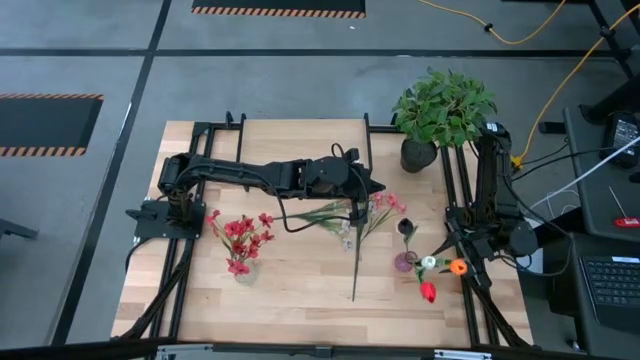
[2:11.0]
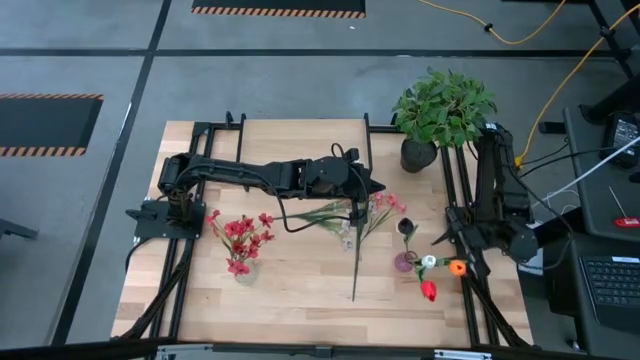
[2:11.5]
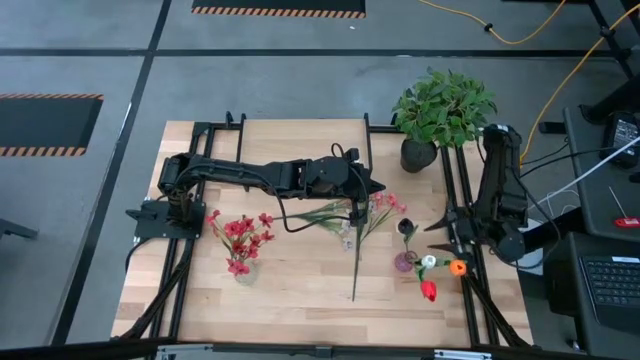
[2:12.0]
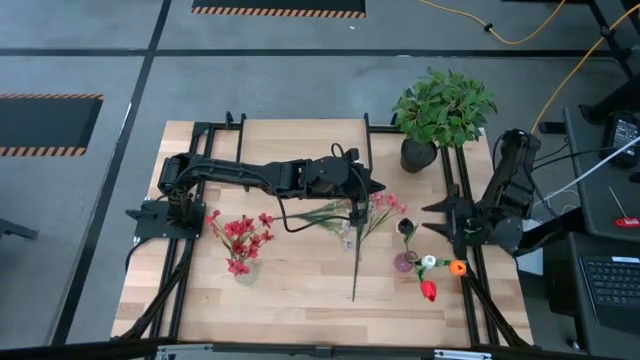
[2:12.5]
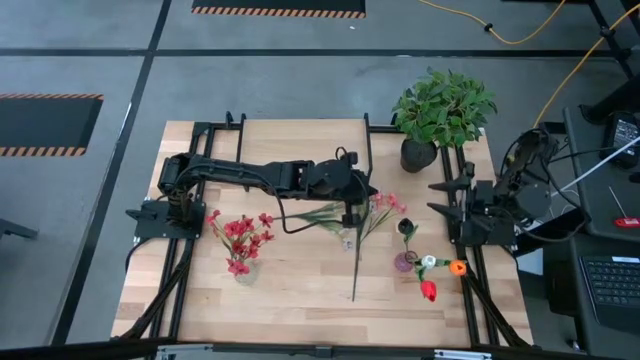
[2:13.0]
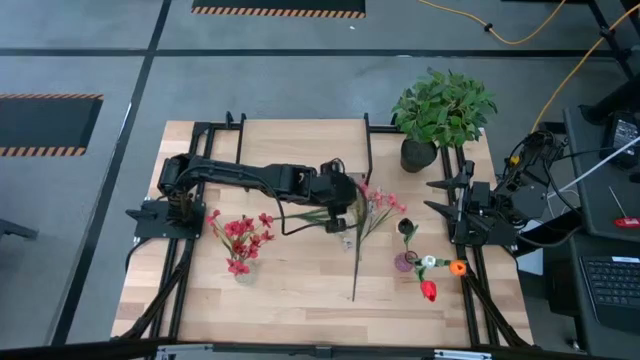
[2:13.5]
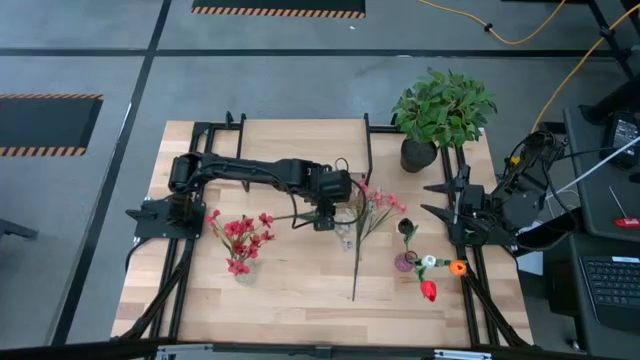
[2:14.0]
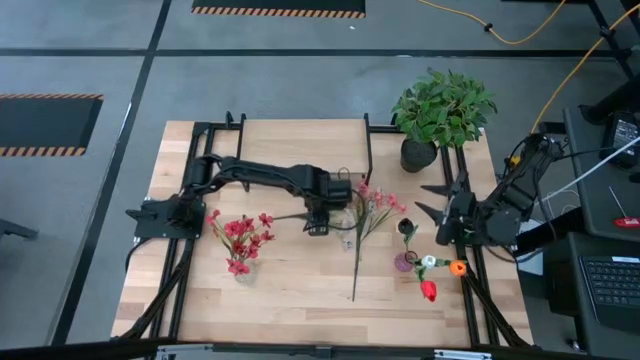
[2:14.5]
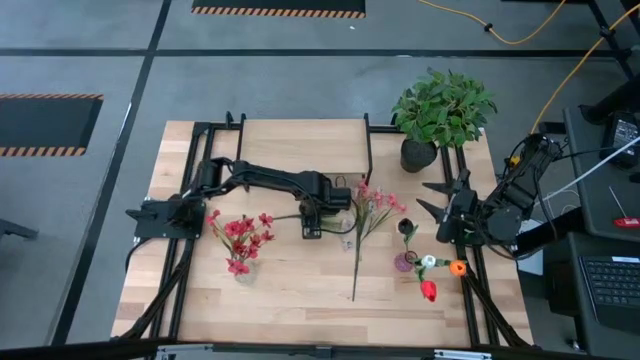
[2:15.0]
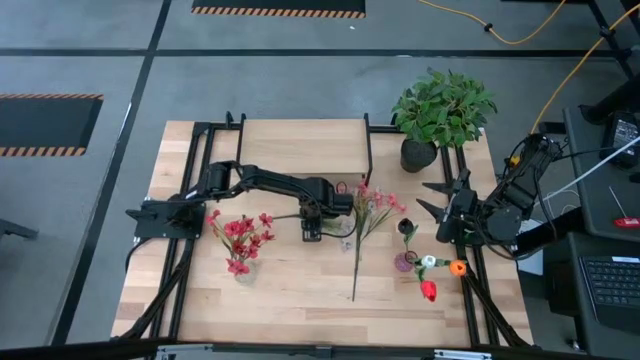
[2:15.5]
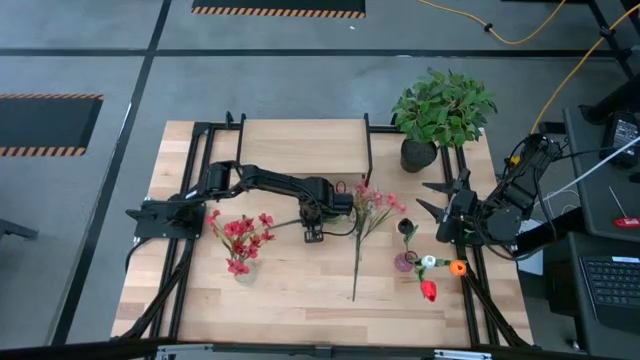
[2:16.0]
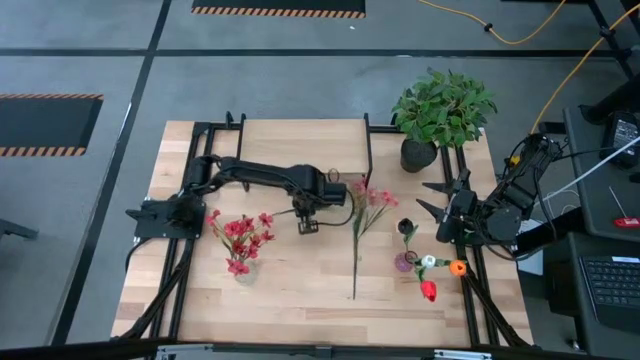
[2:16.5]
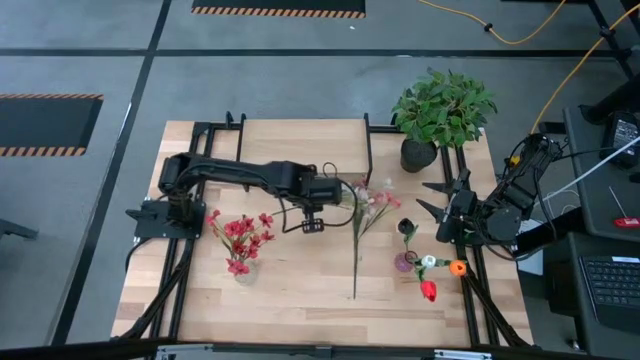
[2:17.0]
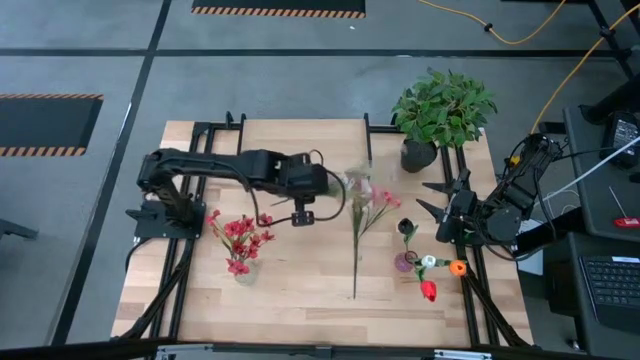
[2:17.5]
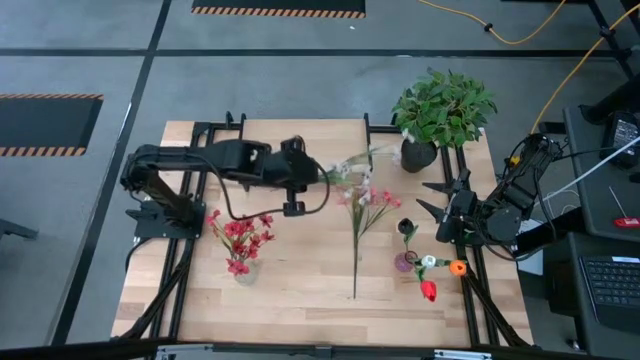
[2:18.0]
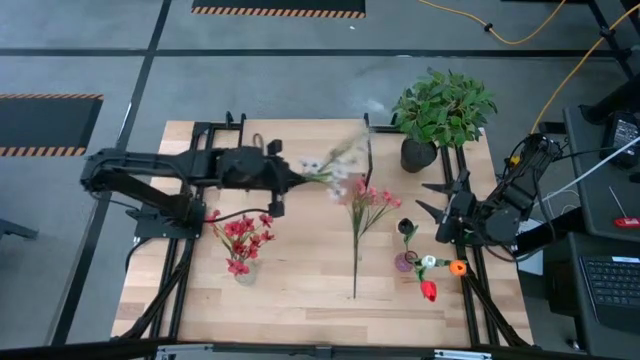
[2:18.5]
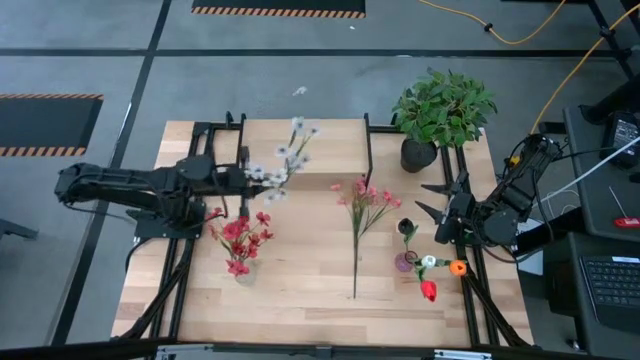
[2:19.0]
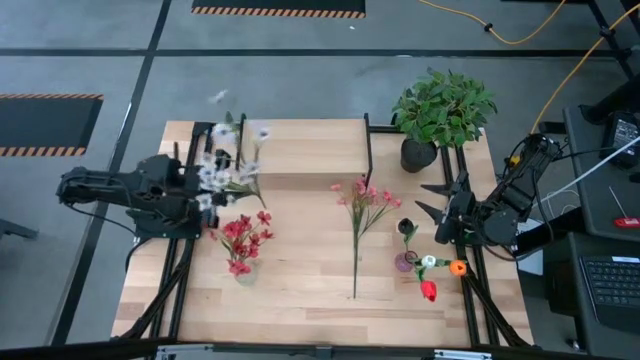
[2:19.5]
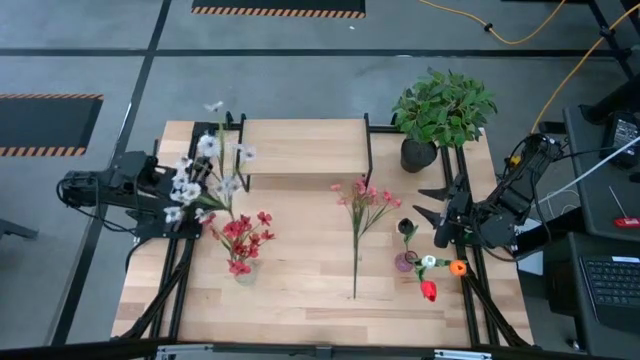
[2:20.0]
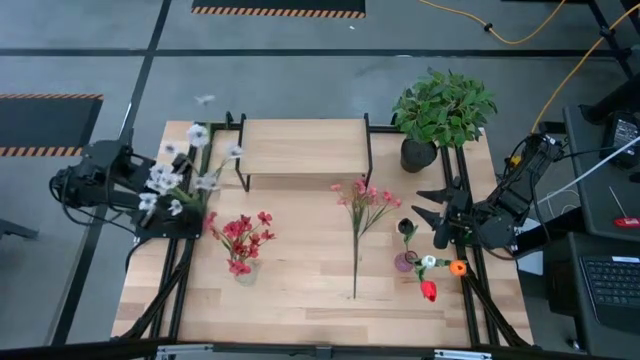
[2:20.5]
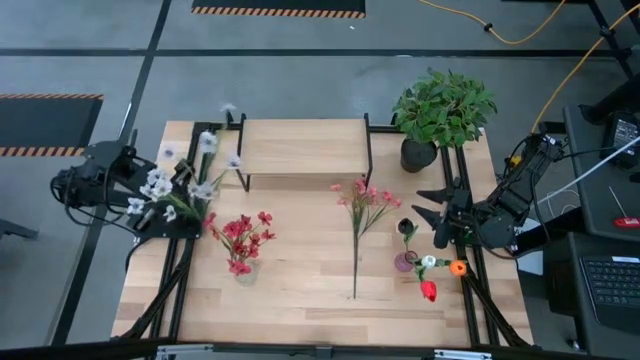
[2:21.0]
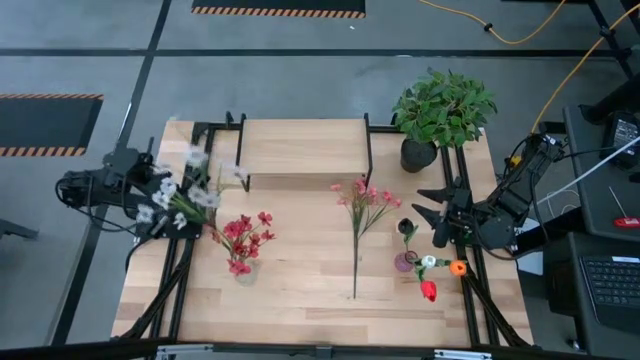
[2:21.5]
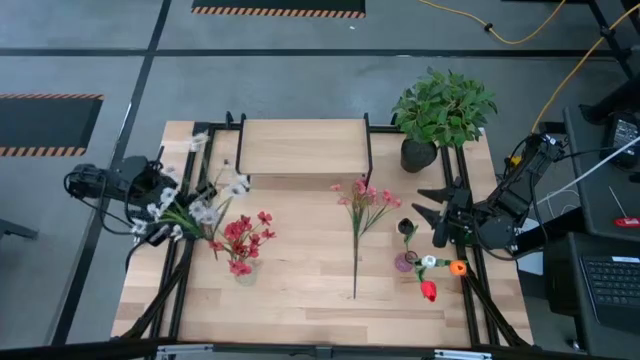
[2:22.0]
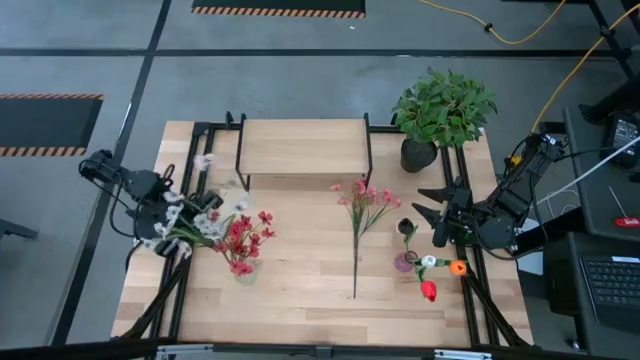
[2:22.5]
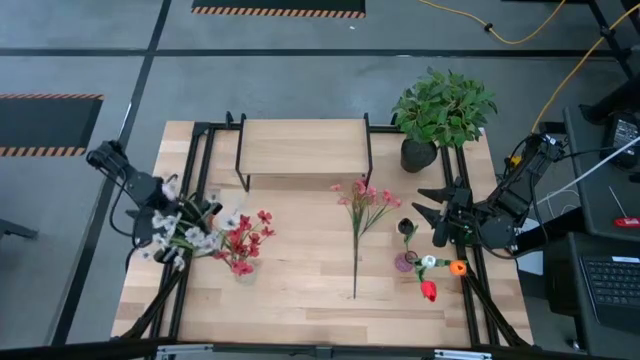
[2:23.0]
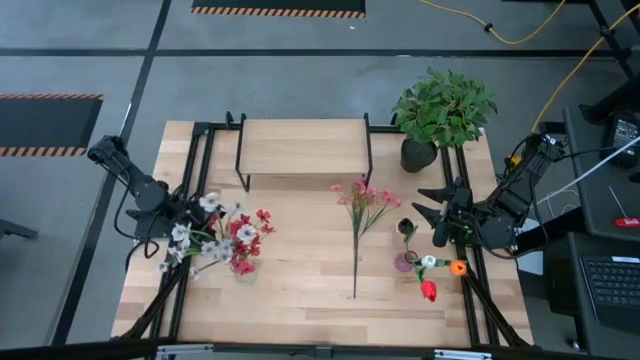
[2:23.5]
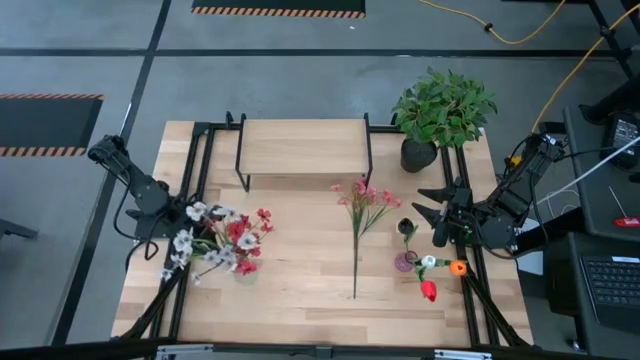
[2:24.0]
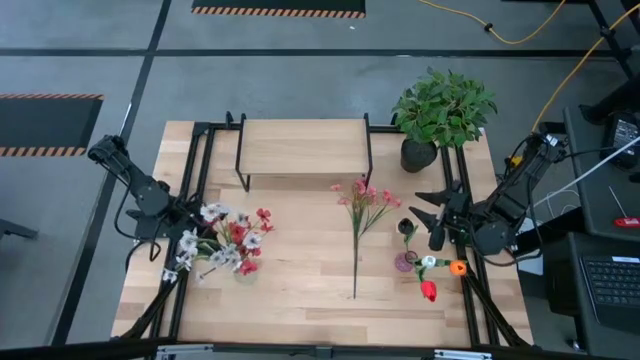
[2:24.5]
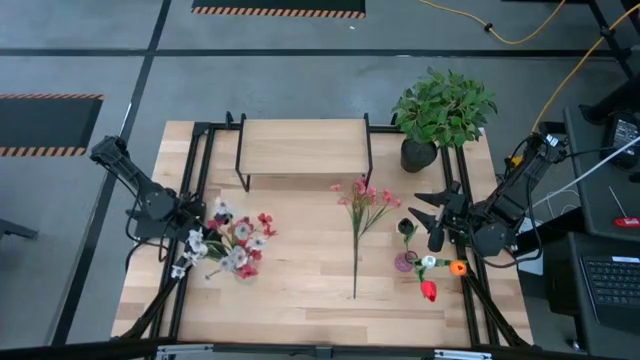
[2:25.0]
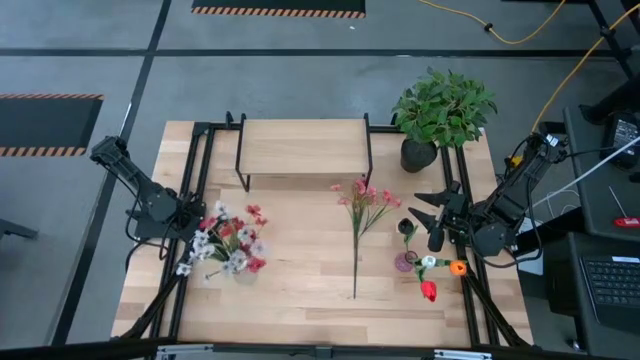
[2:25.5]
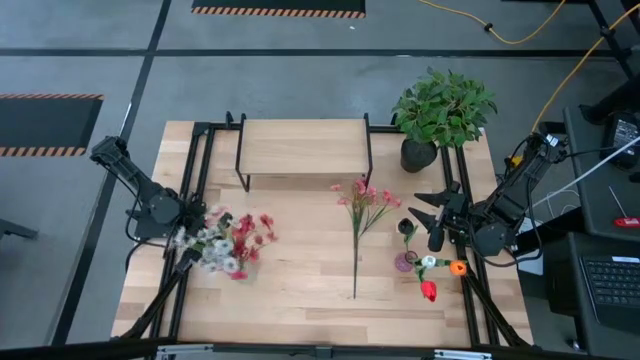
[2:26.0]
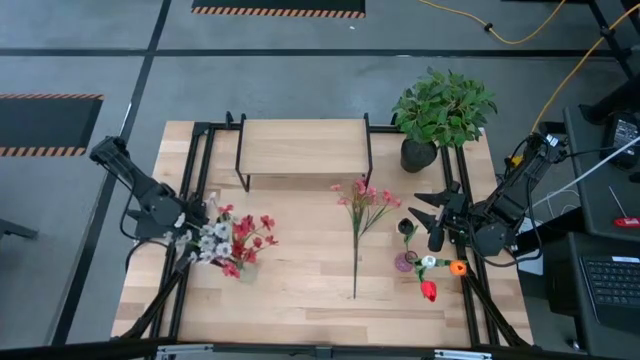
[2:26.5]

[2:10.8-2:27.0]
Task: Pick and place flowers into a vace then onto a shelf
Put the white flowers into the transparent vase

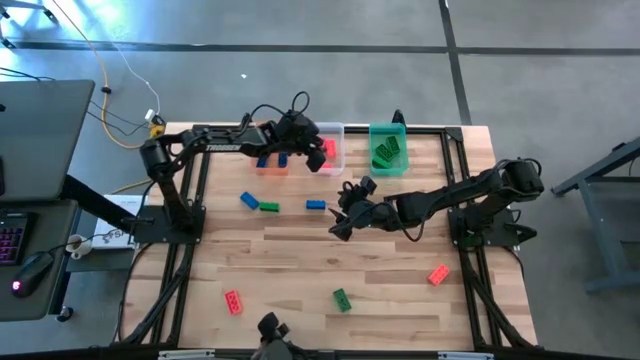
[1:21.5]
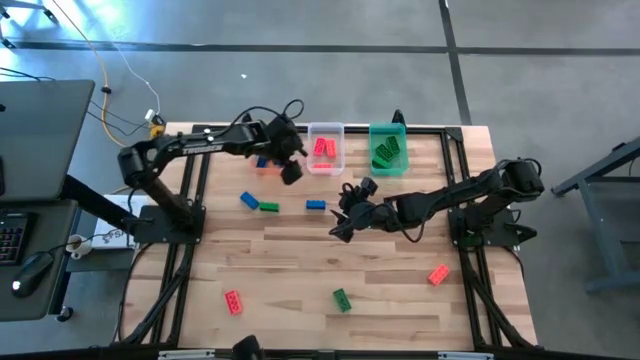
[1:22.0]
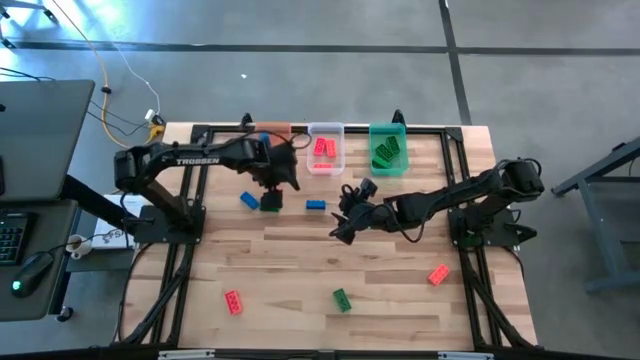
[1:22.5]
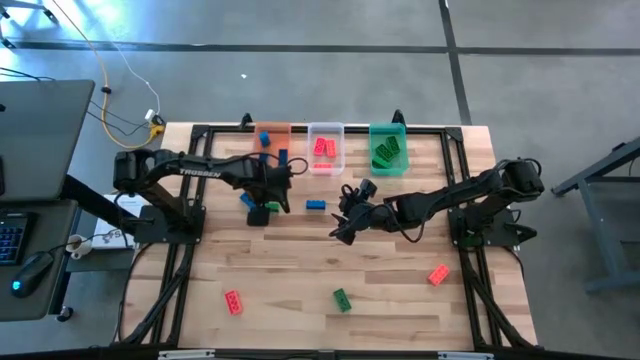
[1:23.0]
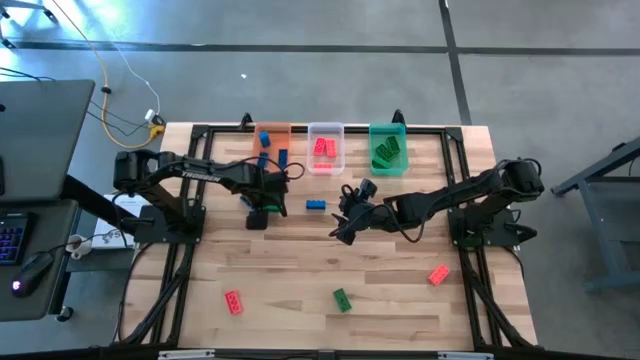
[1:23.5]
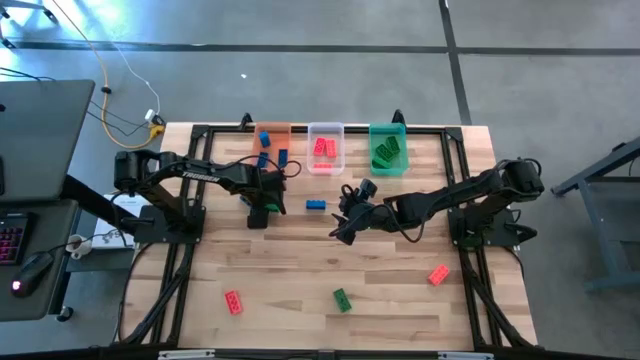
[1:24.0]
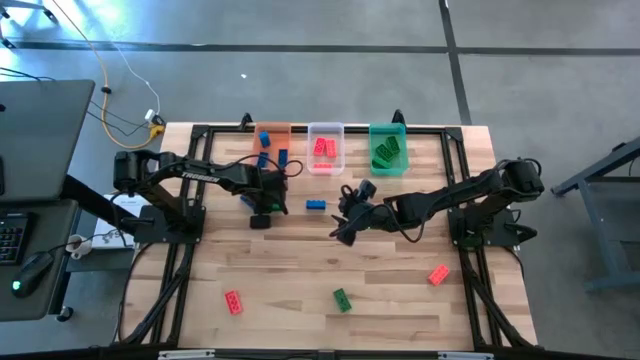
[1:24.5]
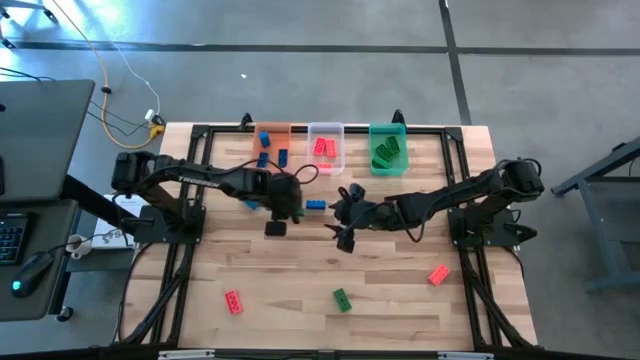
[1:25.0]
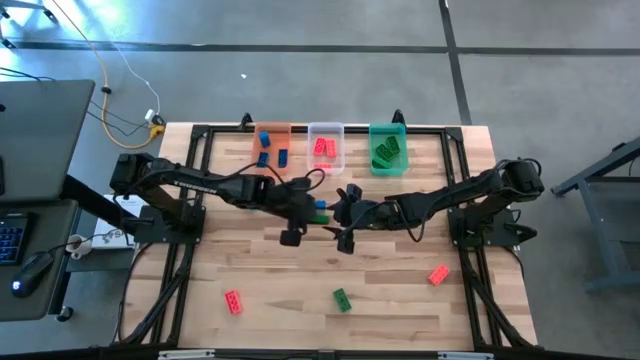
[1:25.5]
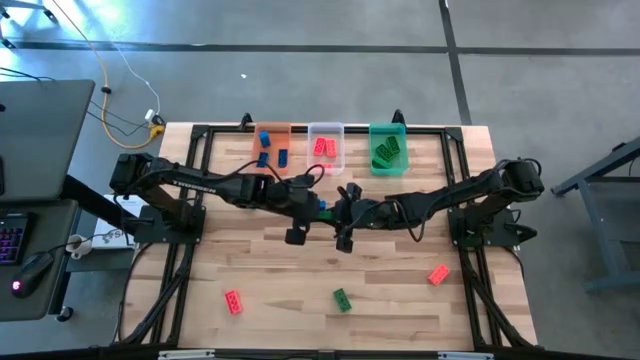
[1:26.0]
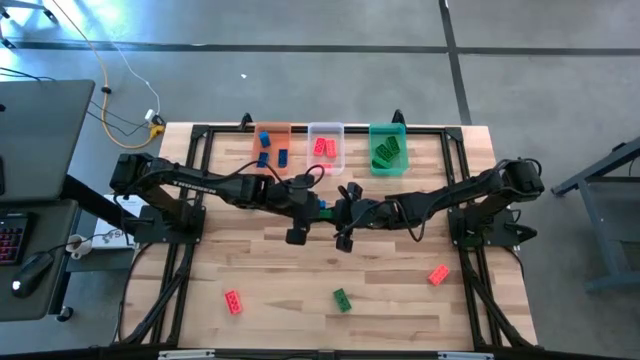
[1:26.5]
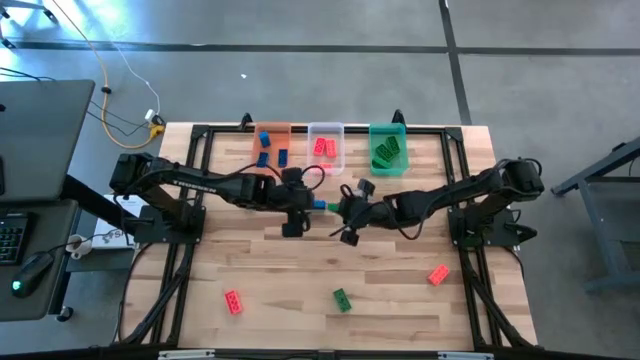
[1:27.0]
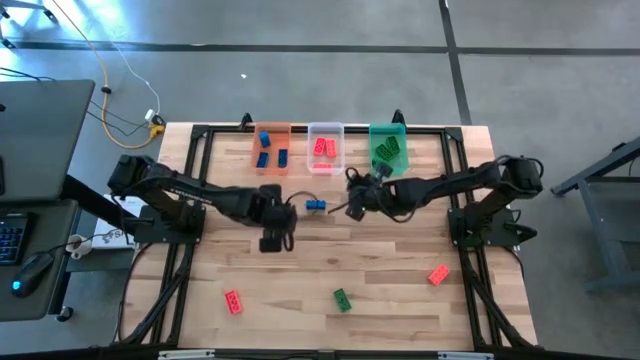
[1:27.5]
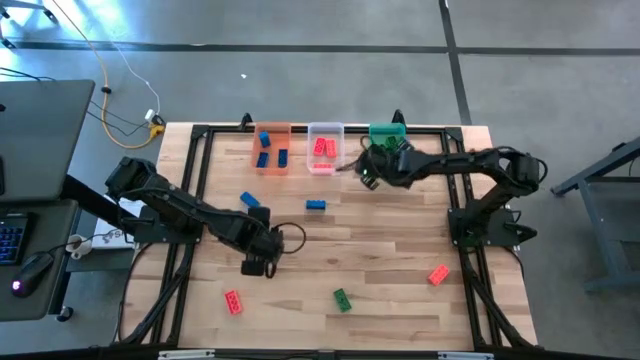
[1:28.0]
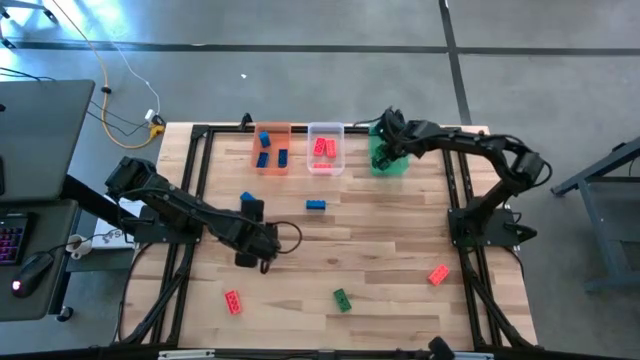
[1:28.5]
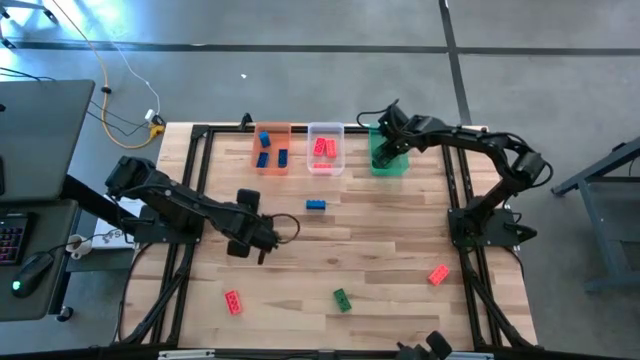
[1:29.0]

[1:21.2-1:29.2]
Task: Sort & place blocks by color
Put the green game piece into the green bin
